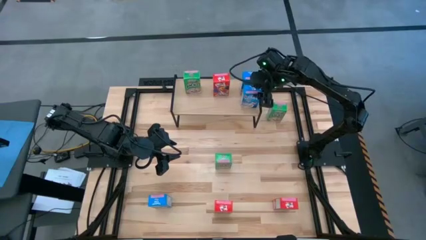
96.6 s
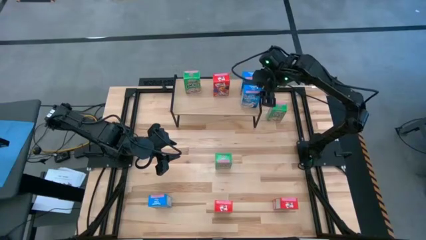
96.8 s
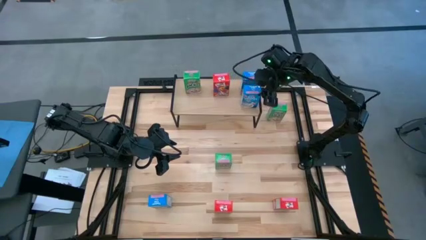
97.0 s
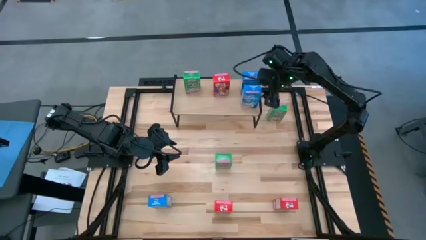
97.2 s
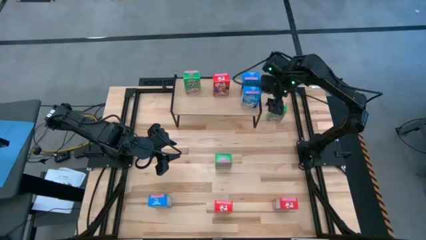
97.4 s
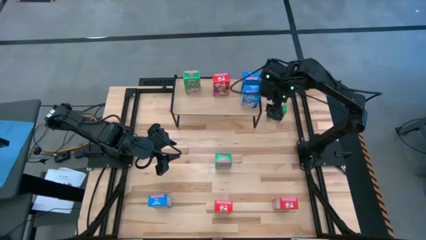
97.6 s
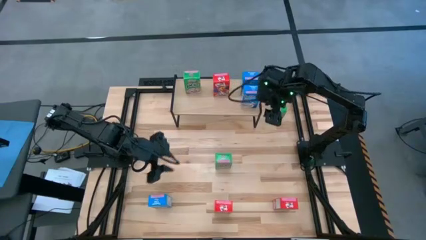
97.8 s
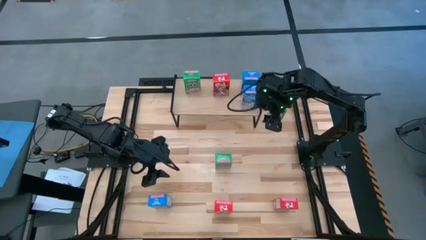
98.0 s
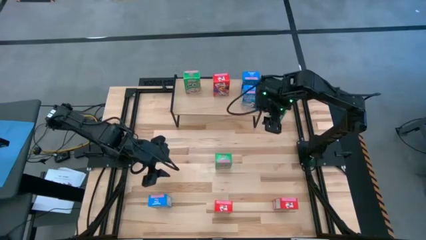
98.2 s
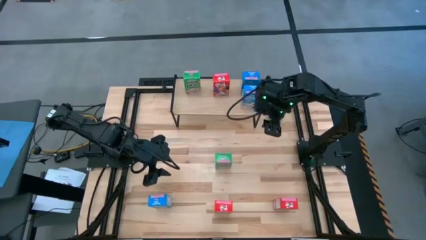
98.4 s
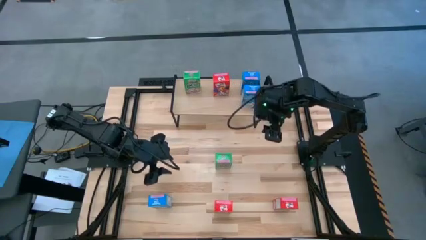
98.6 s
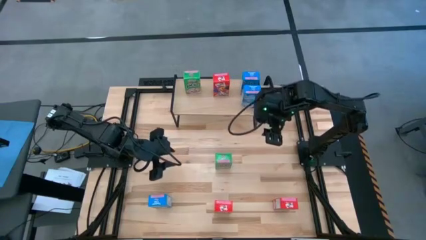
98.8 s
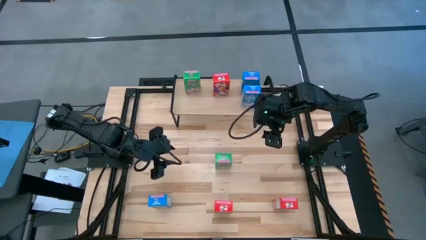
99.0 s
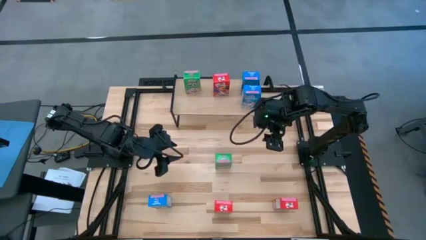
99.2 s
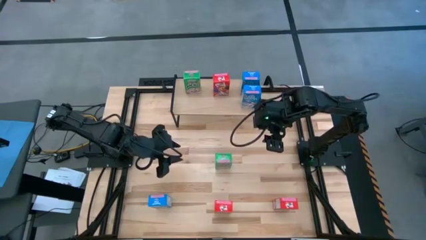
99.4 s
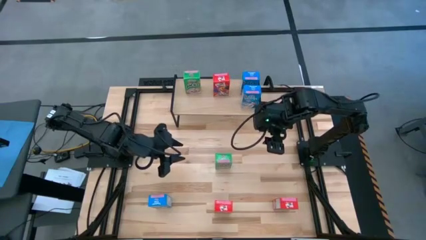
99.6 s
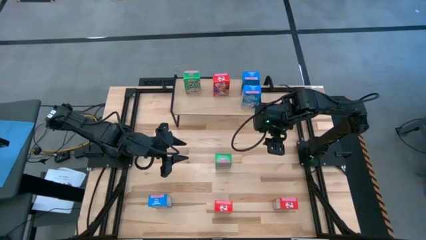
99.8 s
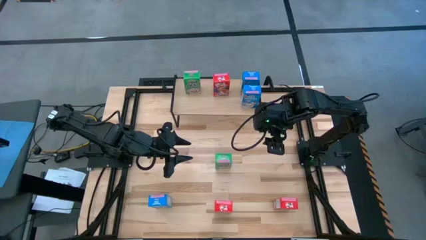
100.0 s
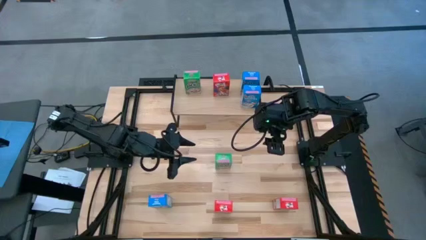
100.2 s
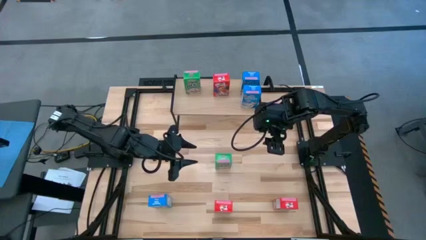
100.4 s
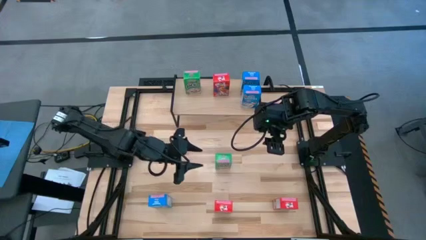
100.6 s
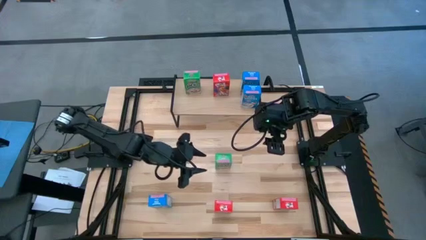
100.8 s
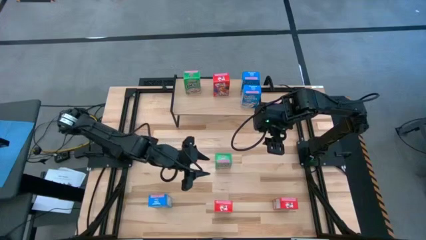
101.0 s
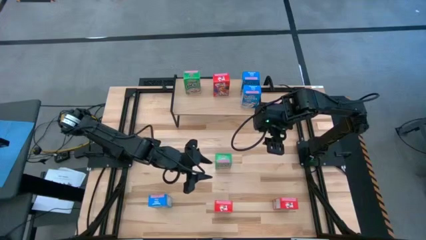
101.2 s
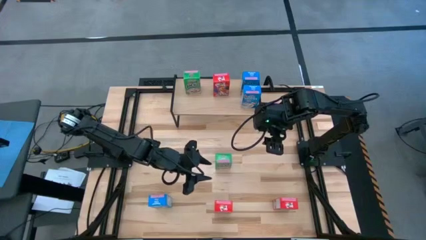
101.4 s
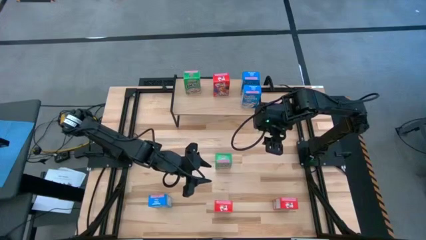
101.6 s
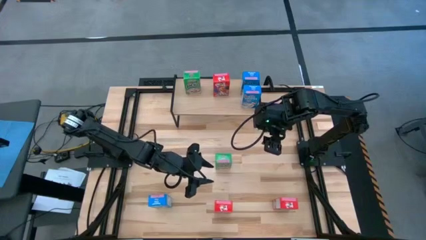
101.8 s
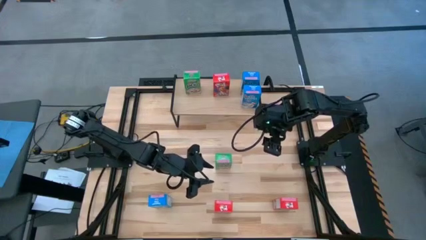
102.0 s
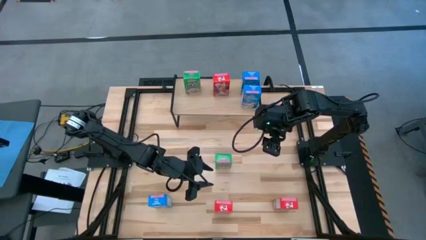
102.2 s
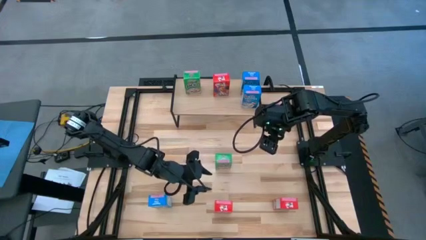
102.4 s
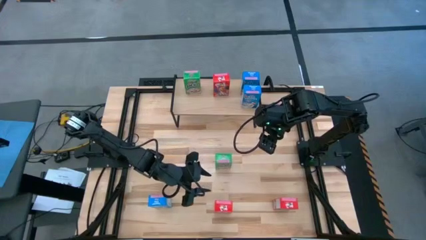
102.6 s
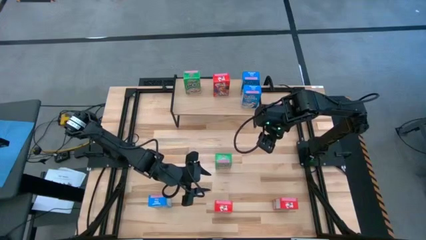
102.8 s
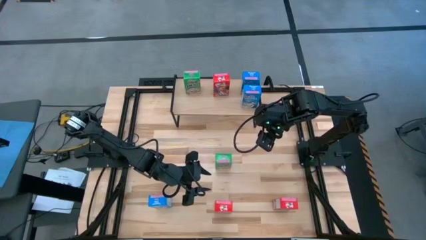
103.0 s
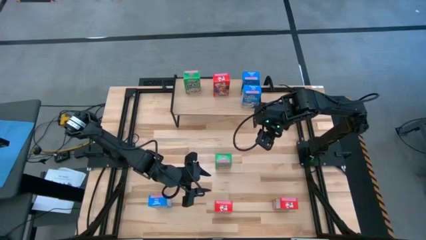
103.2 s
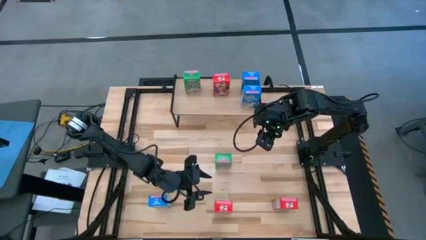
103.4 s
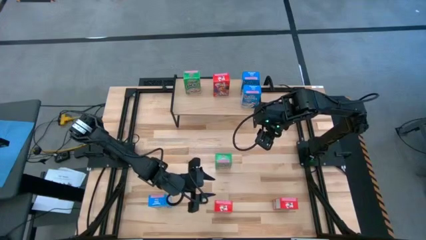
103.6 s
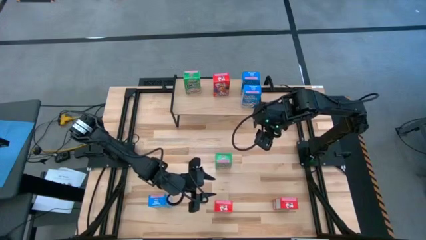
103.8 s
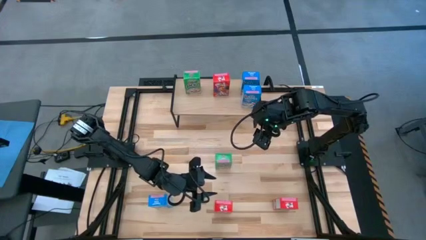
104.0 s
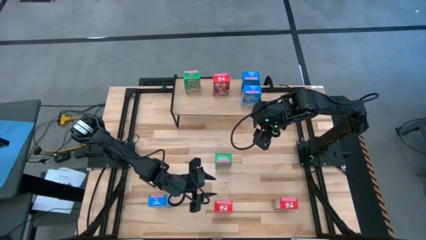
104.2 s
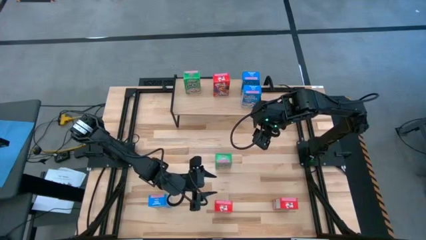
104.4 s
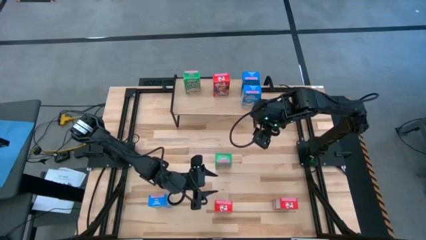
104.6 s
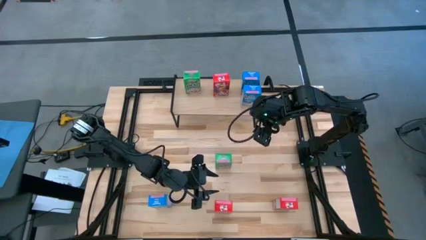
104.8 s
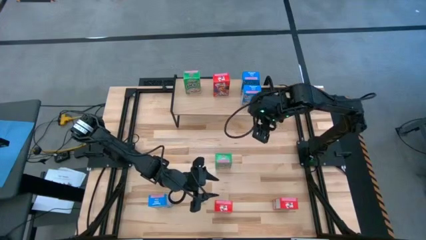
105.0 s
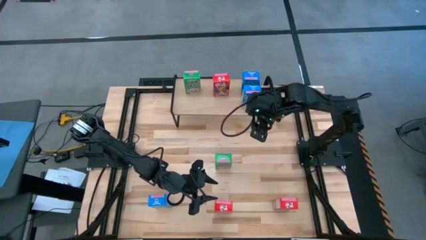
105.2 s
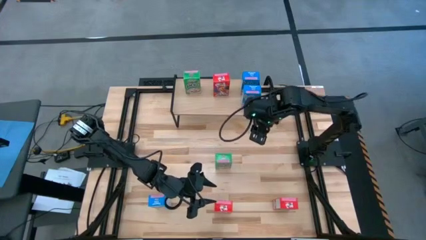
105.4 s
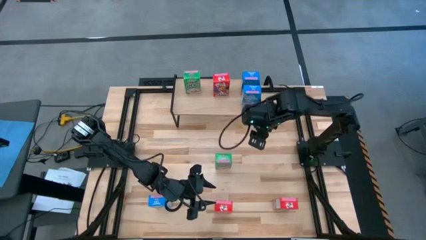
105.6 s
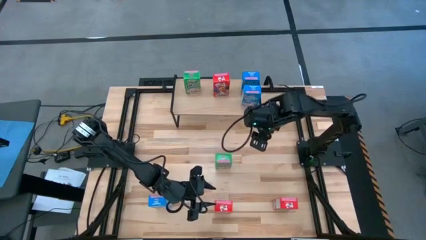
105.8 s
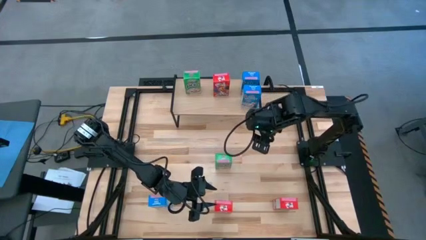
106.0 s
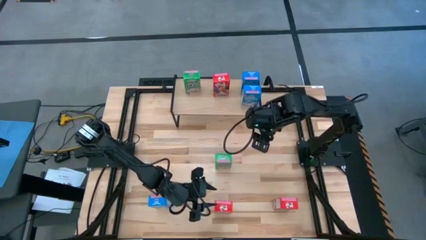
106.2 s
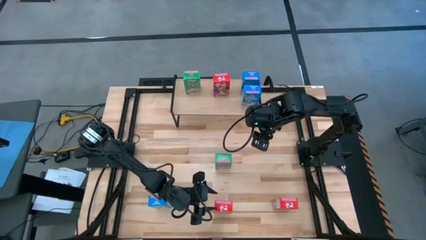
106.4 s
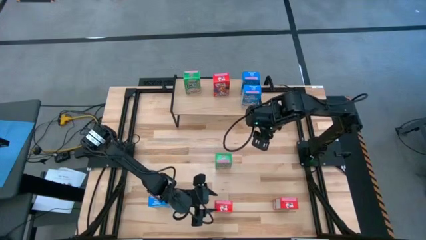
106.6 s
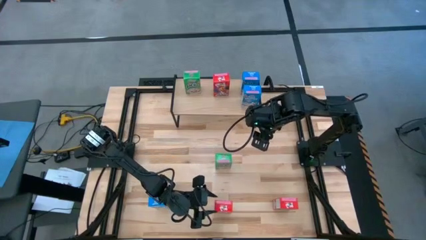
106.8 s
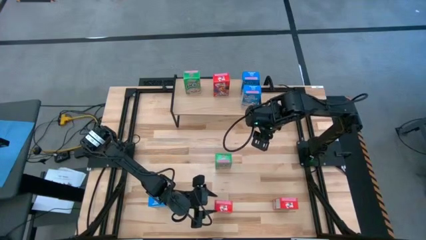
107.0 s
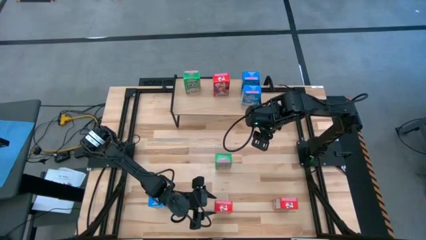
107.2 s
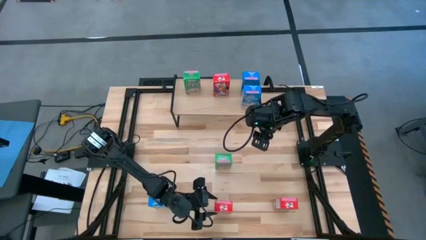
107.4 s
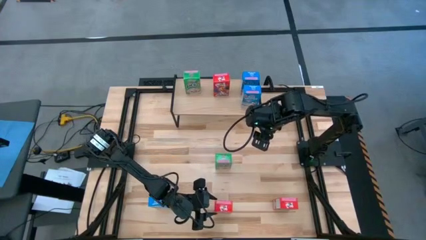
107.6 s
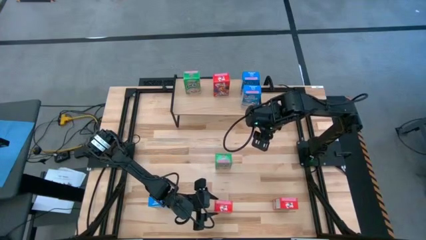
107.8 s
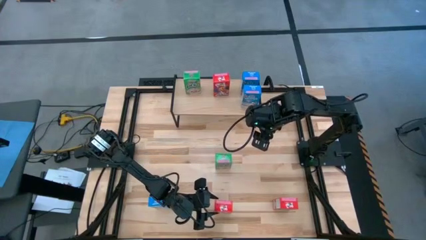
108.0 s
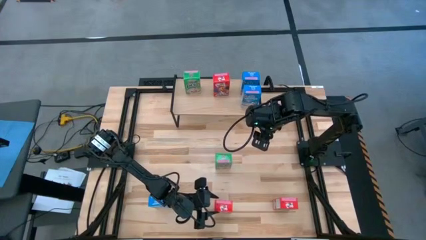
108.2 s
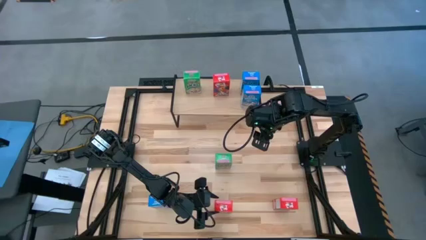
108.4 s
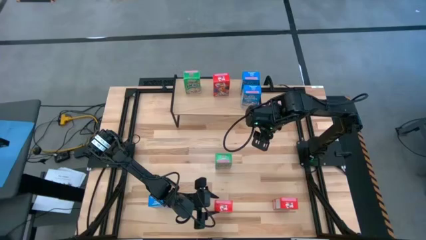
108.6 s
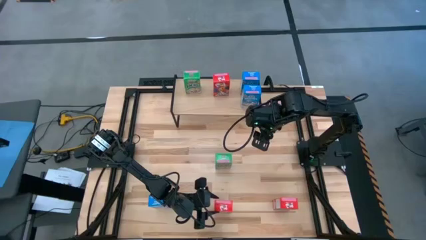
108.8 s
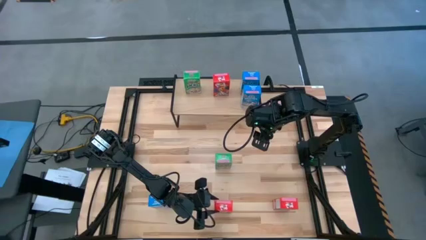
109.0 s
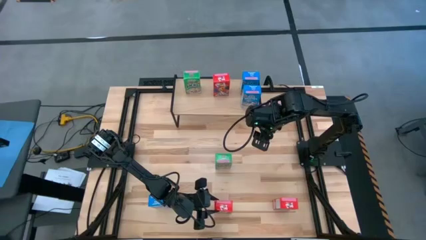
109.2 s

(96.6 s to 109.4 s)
Task: Stack cereal on shelf
Put the left red cereal box on the shelf aligned with the other red cereal box

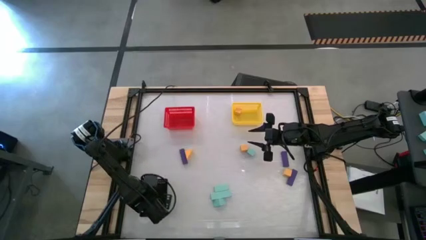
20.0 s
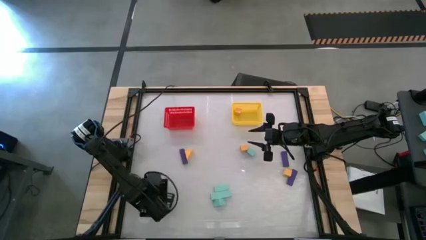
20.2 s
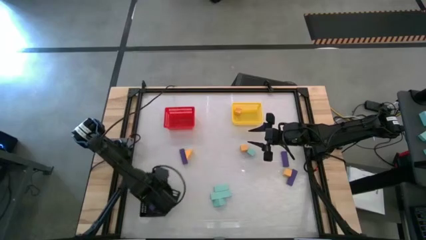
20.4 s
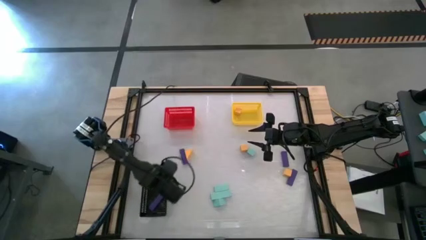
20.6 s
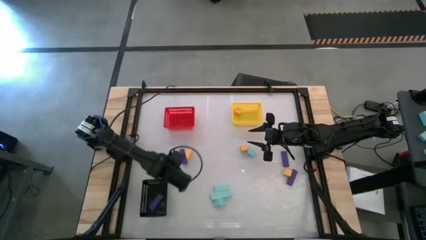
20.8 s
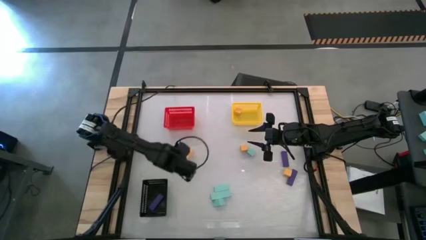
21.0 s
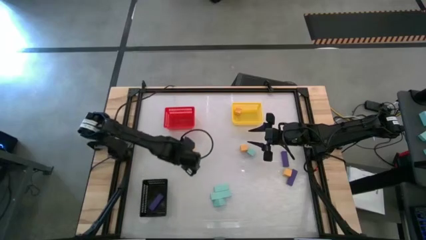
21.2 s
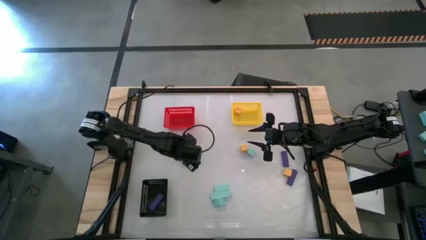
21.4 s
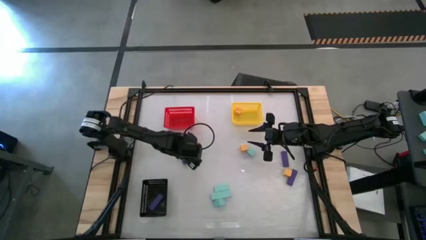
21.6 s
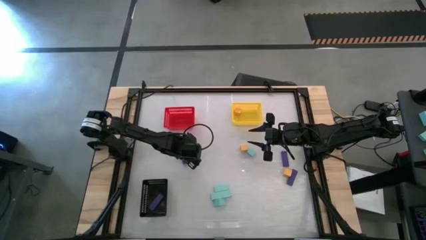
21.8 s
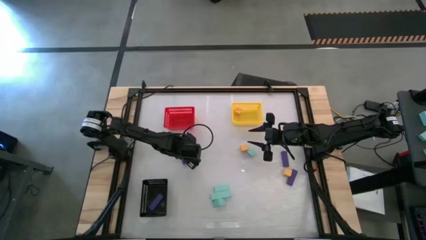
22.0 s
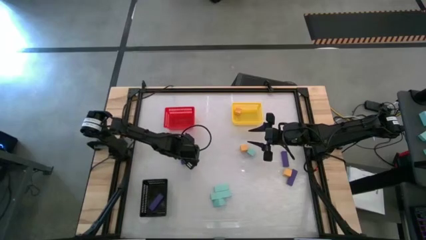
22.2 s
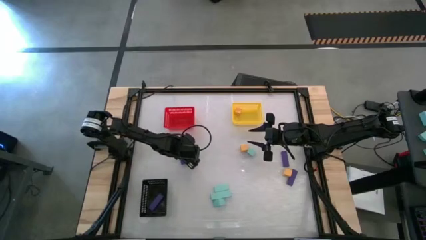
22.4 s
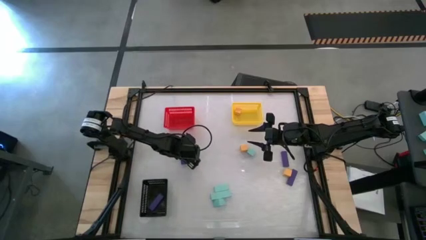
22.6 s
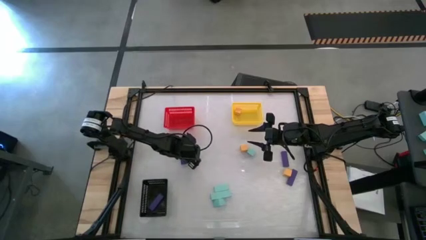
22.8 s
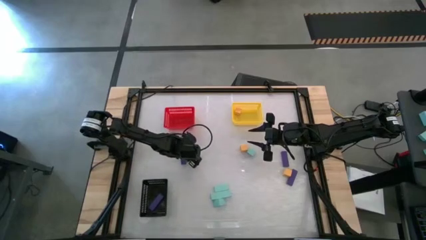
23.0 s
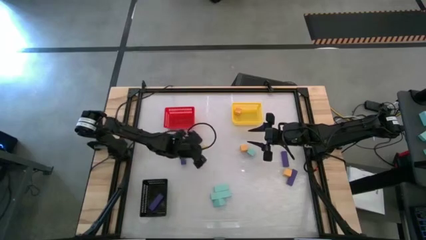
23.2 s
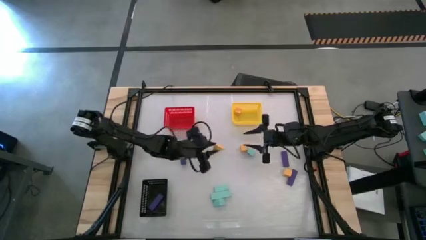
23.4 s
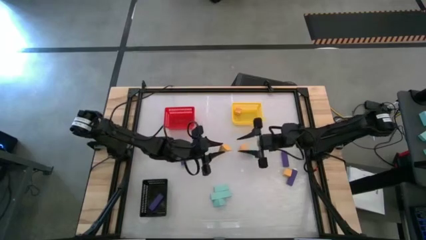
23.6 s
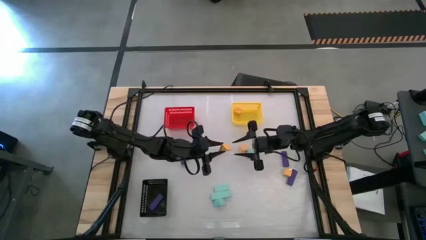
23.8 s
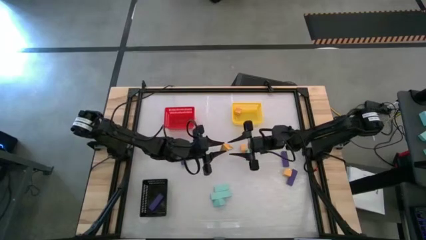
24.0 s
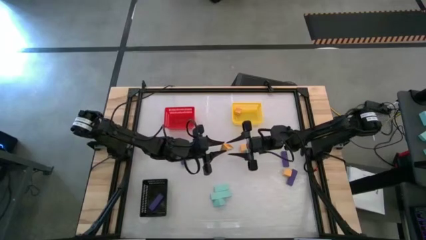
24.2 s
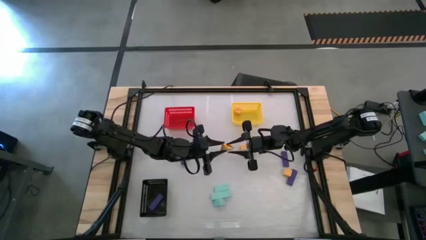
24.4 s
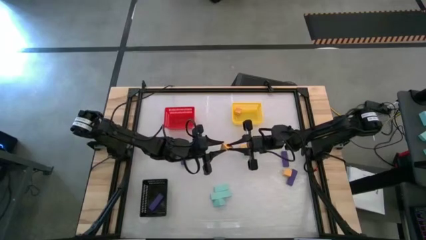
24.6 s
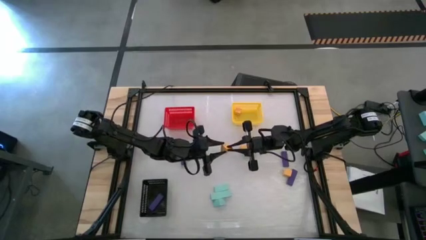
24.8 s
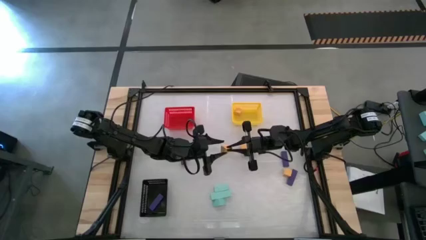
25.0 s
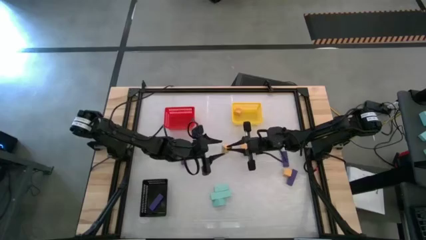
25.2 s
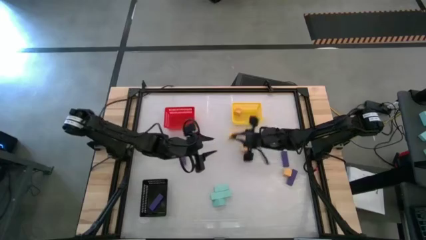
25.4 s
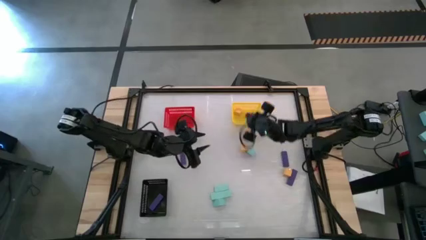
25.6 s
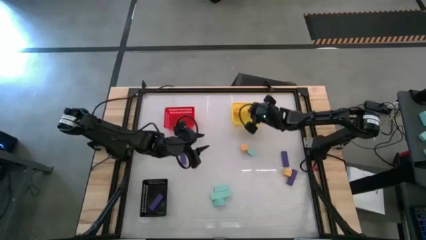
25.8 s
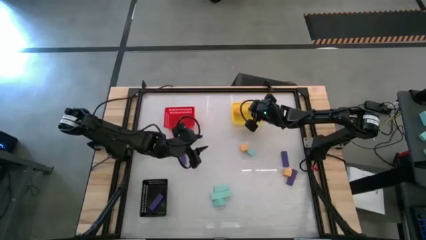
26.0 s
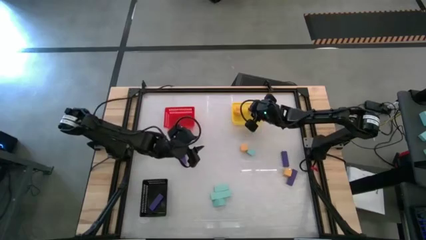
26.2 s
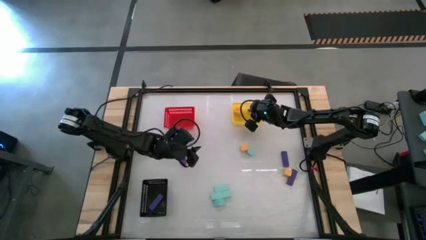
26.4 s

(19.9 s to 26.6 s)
Task: Sort & place blocks by color
Put the yellow block into the yellow bin
